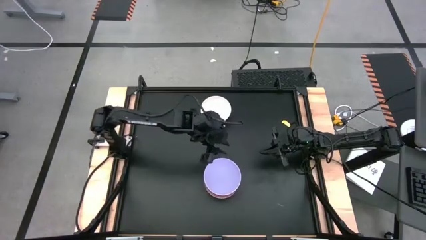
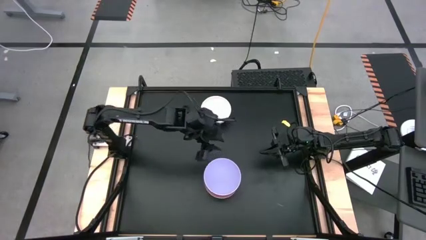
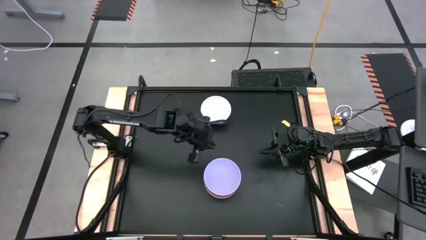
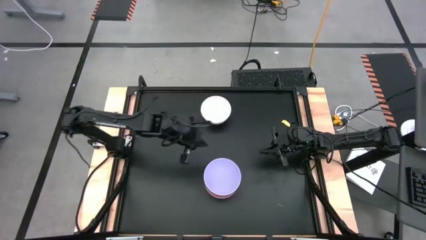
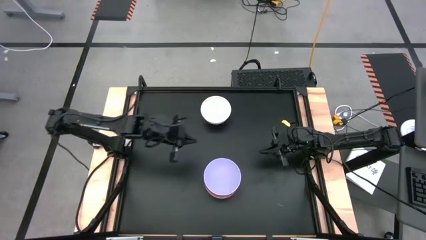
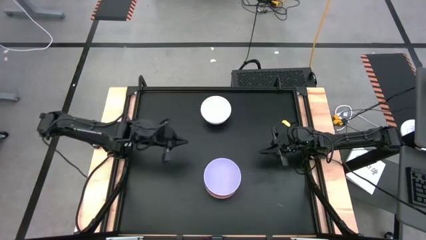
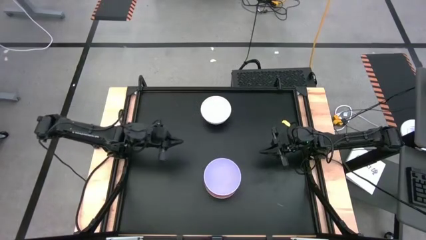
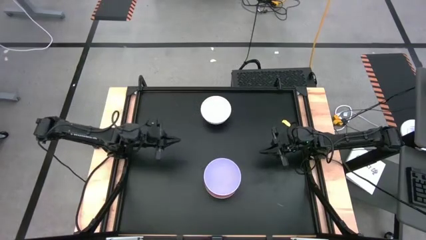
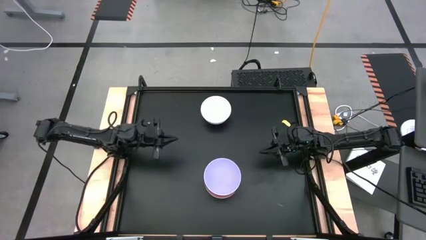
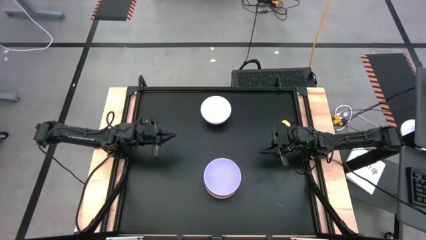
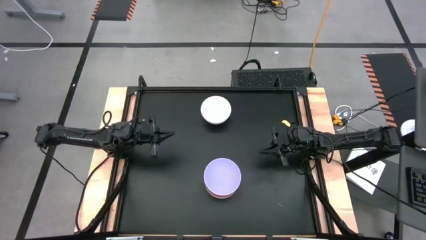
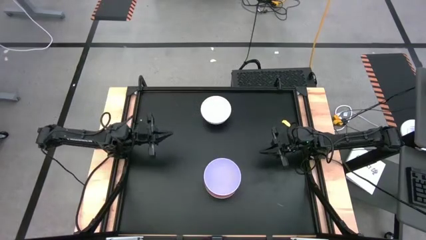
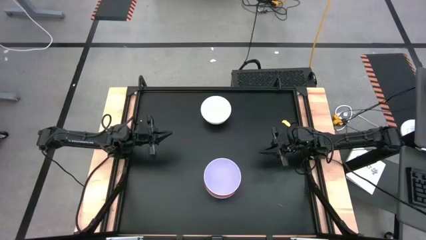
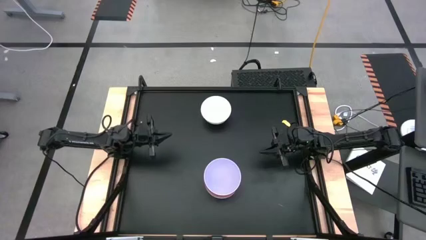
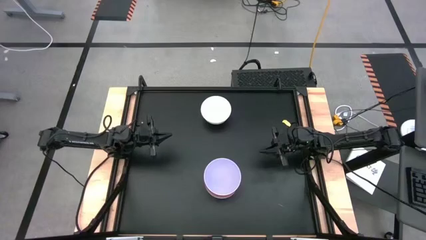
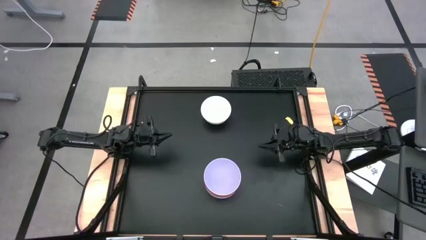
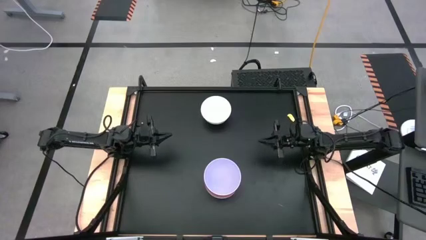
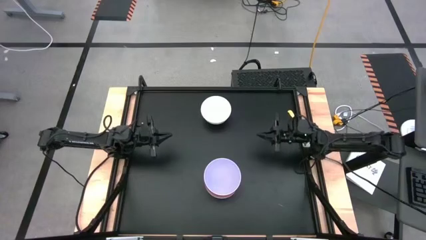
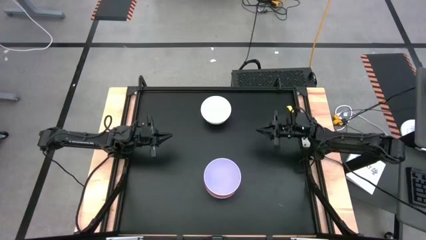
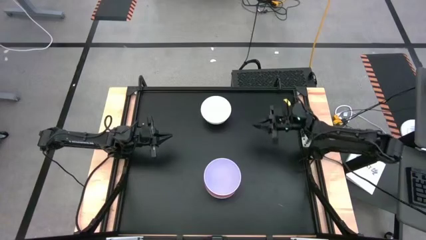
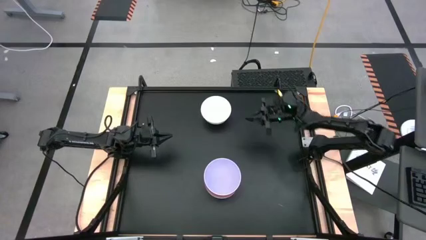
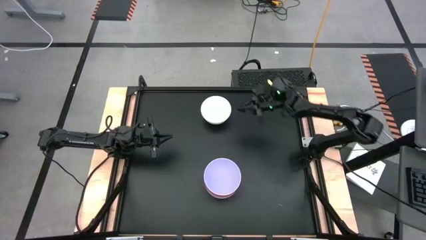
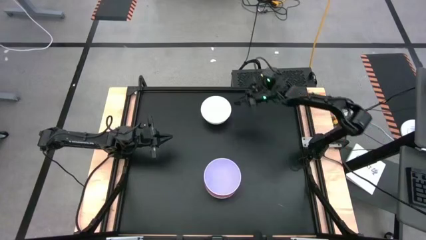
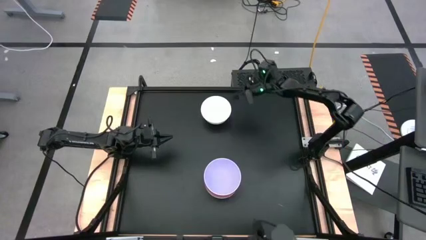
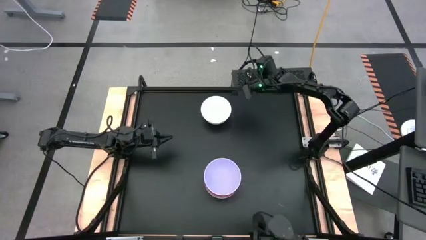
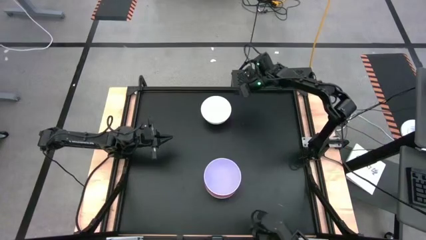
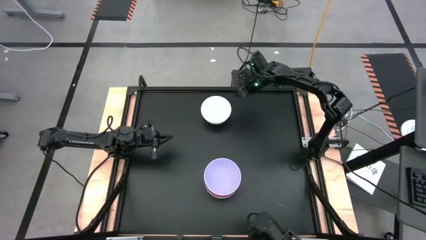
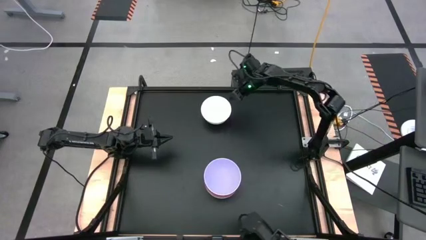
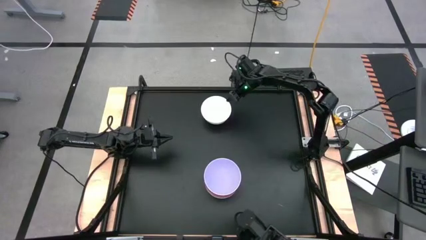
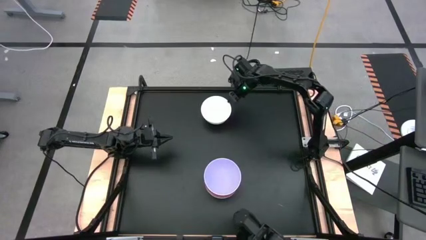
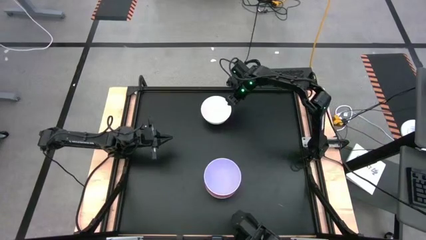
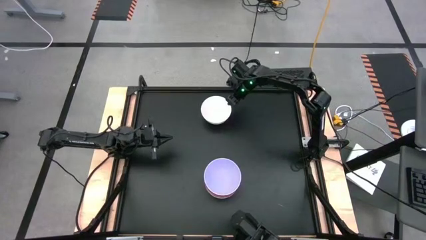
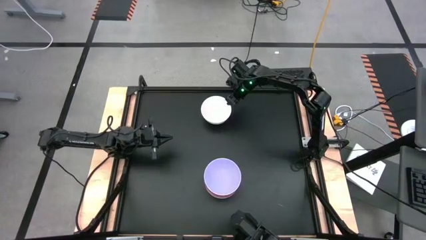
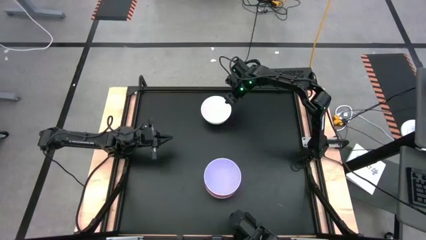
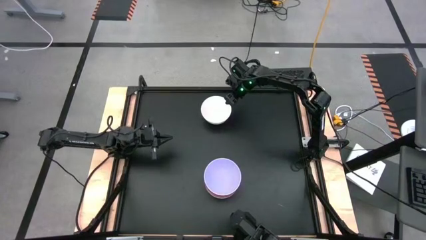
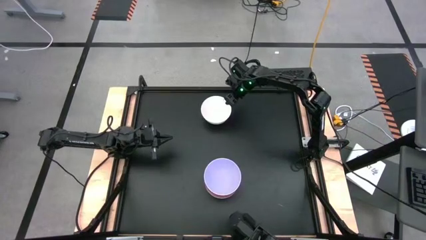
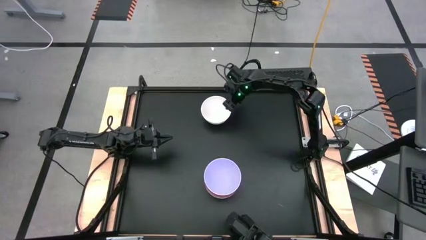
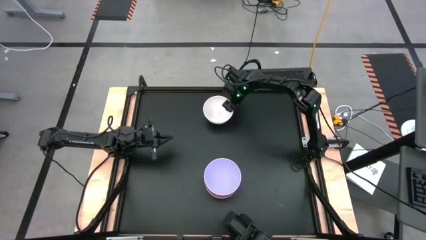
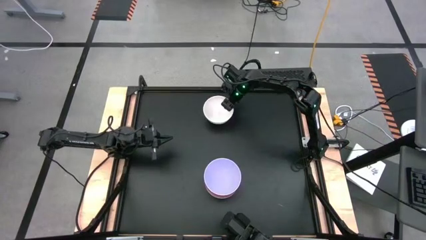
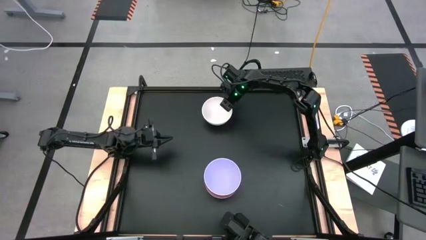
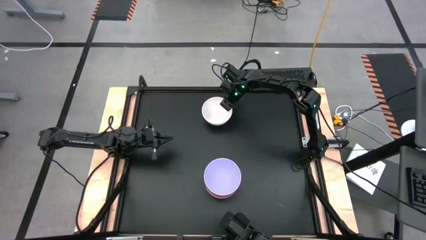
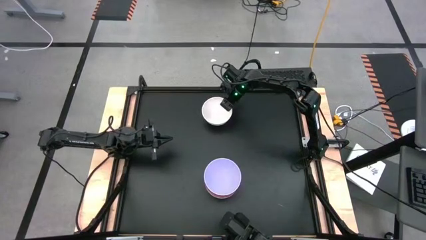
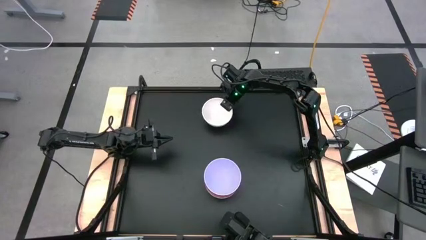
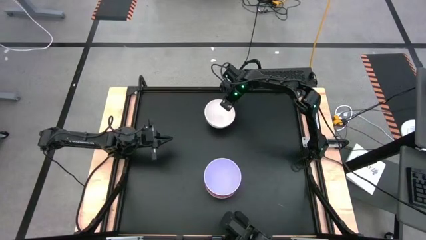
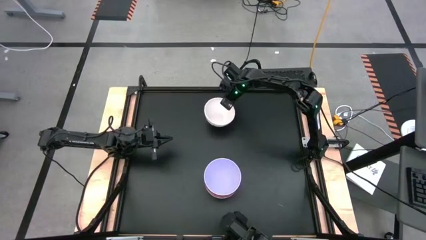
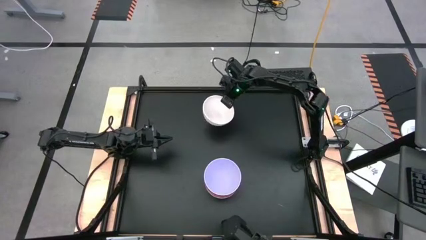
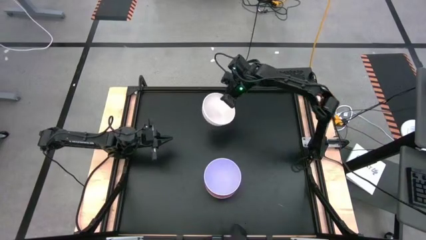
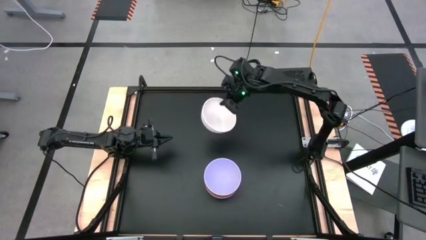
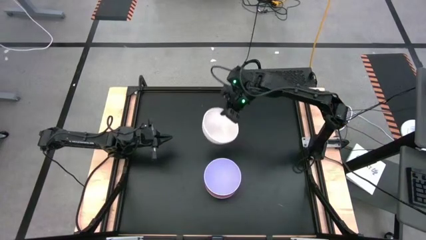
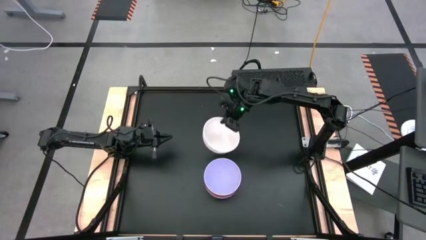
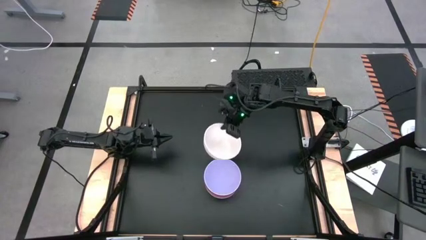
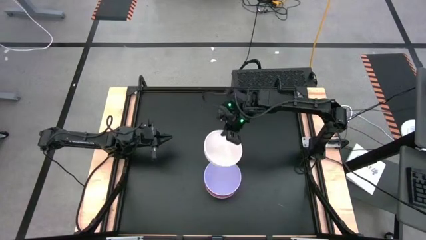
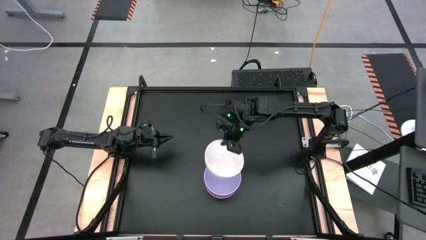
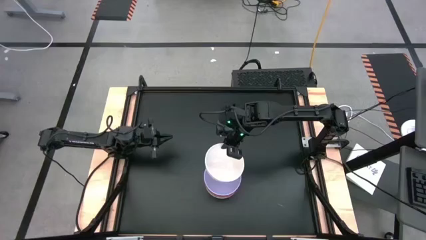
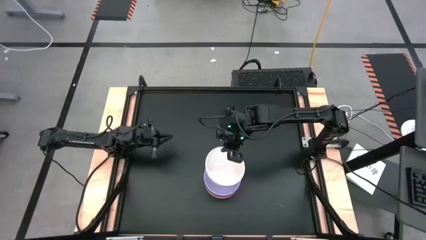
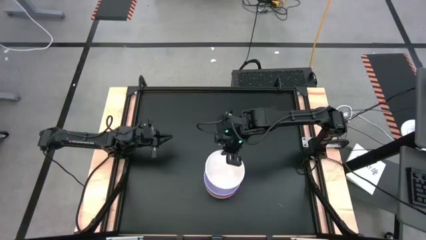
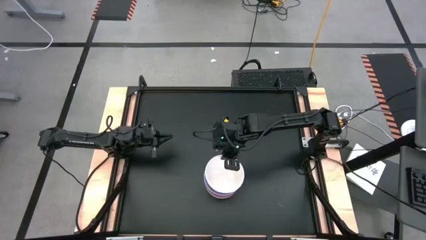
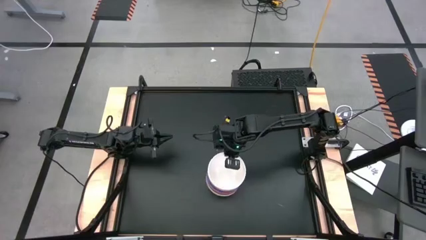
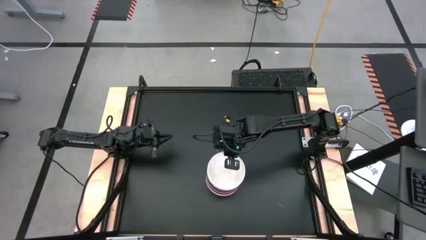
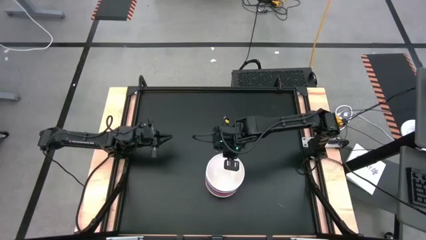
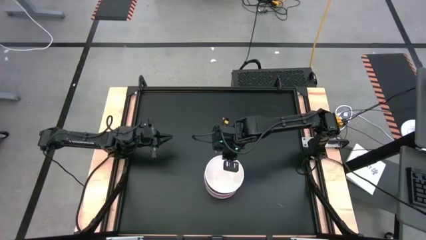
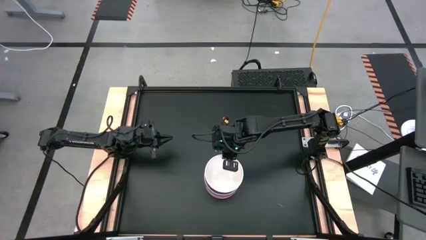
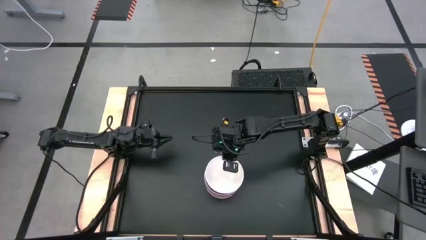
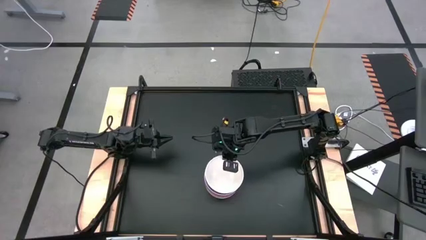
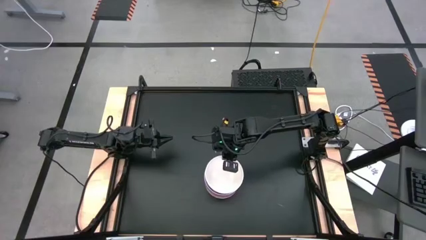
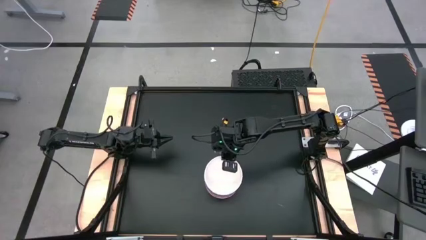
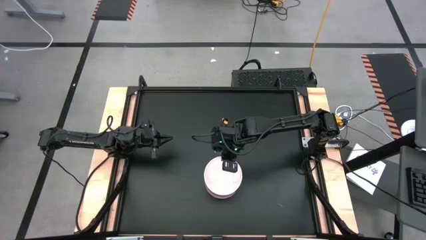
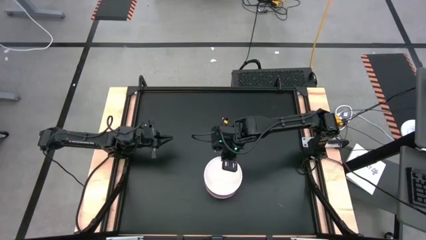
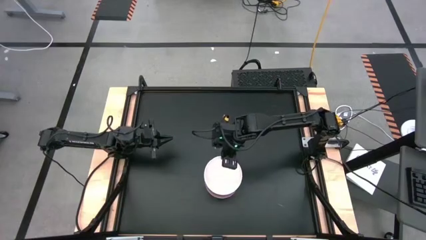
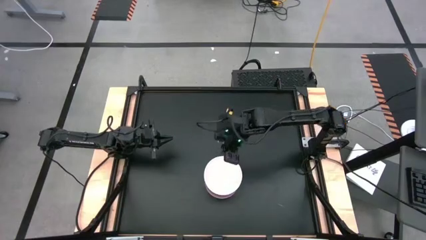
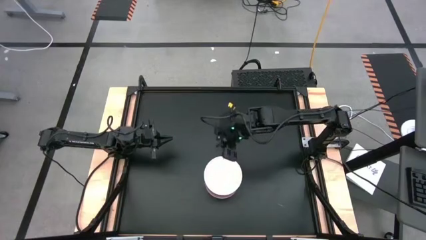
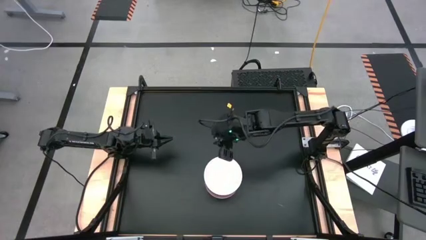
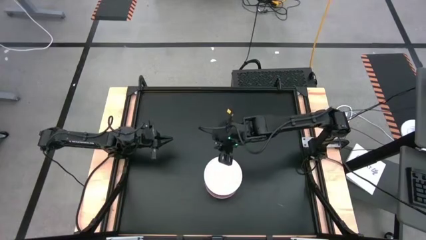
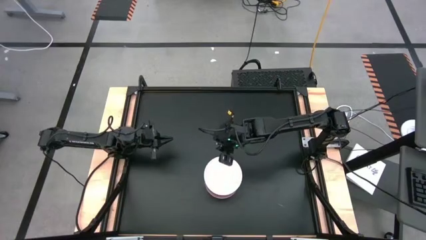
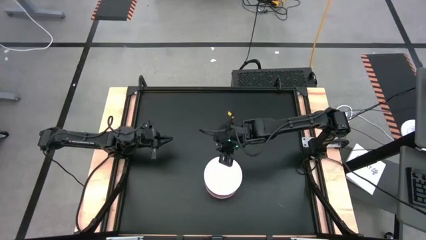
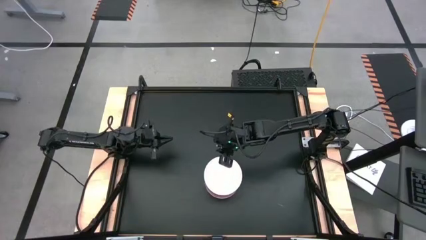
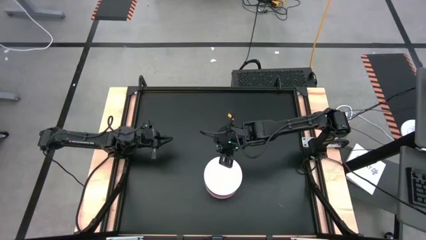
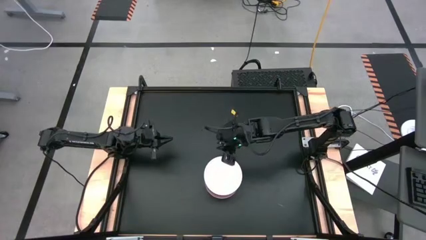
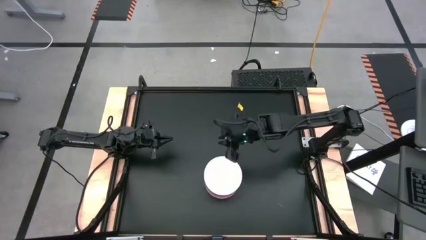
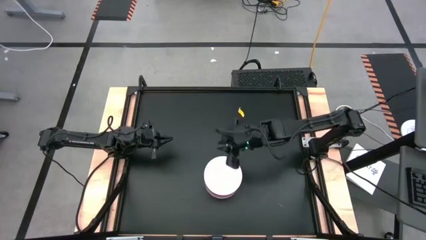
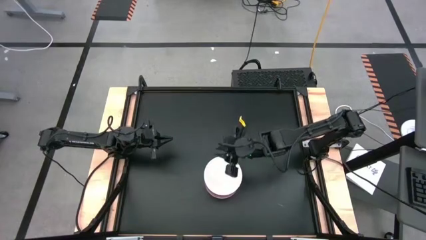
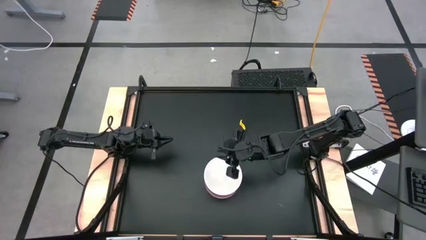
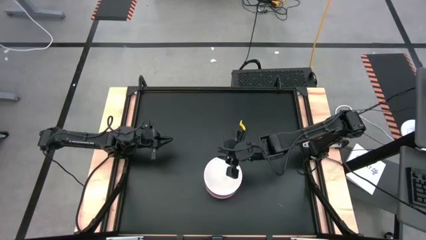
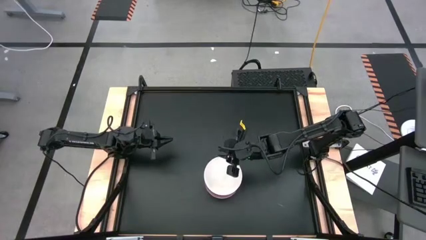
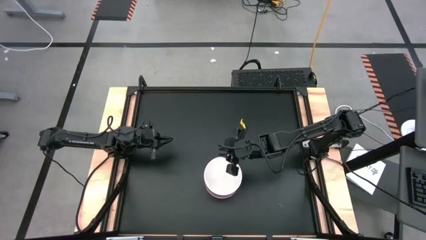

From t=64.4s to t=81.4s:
Task: Nest bowls inside each other
Stack the white bowl on top of the purple bowl
